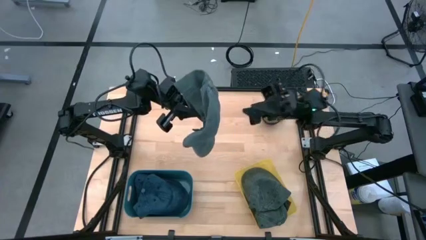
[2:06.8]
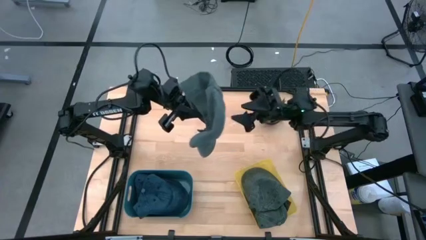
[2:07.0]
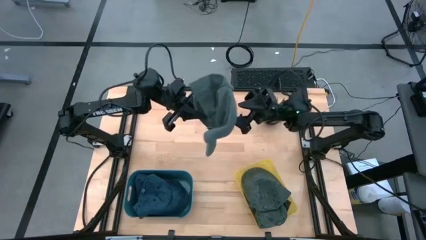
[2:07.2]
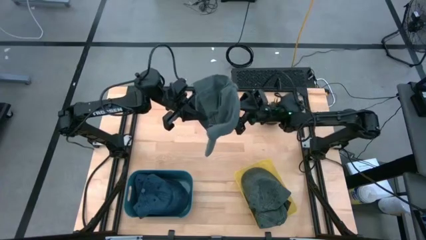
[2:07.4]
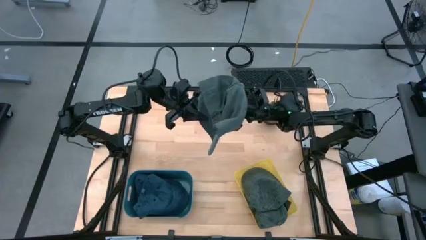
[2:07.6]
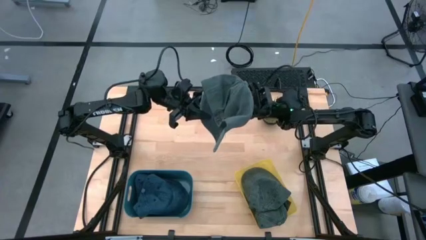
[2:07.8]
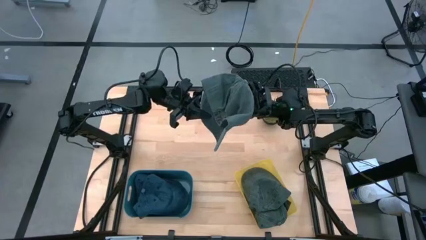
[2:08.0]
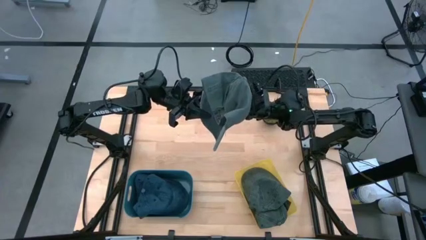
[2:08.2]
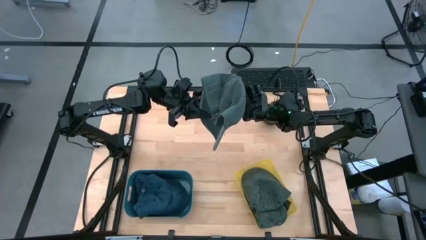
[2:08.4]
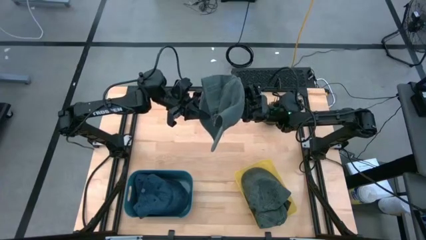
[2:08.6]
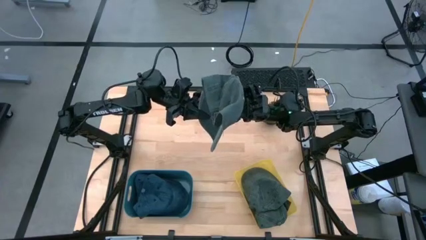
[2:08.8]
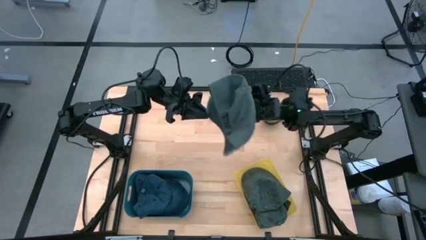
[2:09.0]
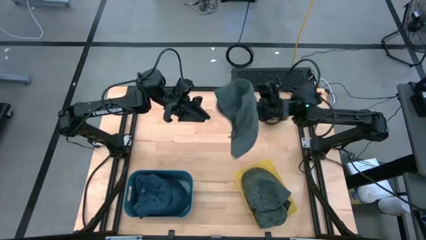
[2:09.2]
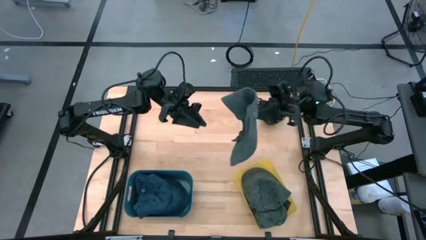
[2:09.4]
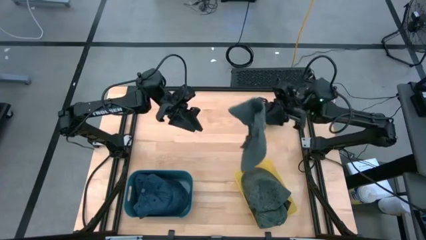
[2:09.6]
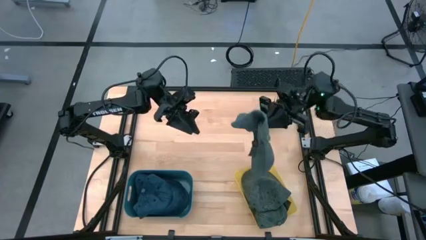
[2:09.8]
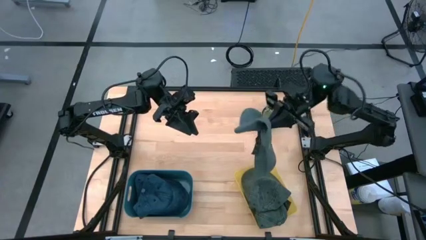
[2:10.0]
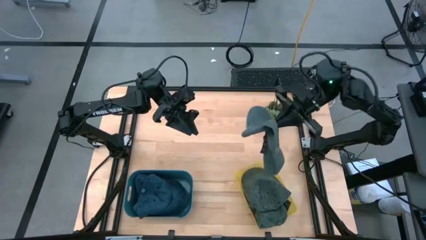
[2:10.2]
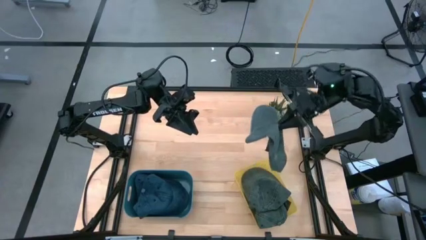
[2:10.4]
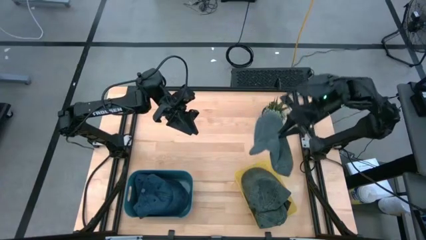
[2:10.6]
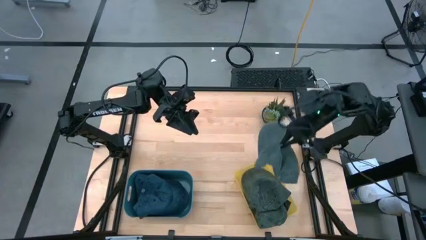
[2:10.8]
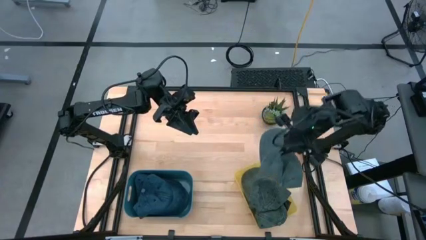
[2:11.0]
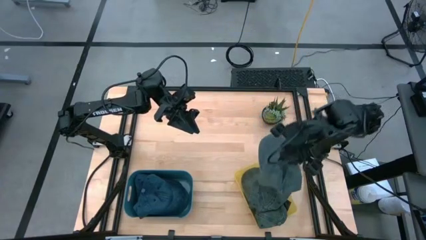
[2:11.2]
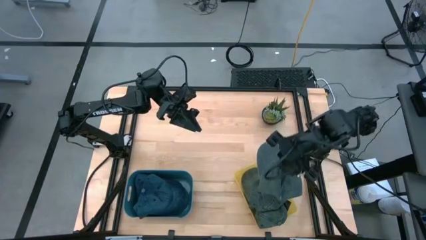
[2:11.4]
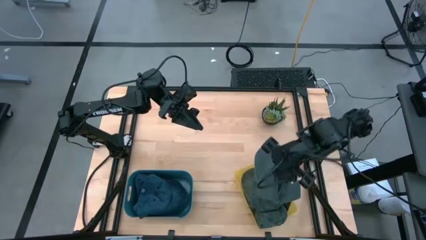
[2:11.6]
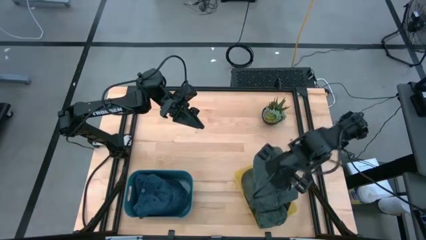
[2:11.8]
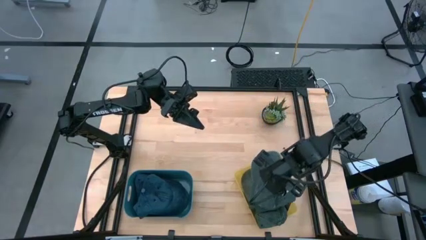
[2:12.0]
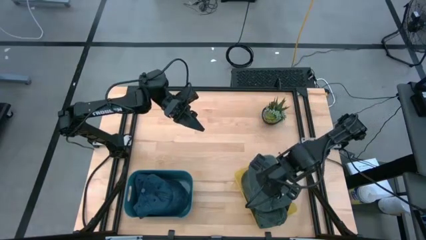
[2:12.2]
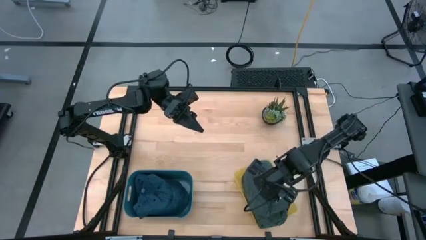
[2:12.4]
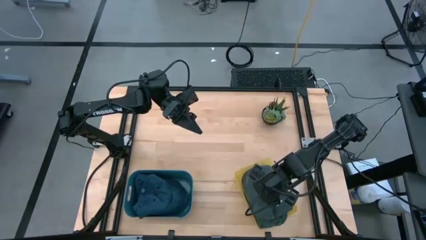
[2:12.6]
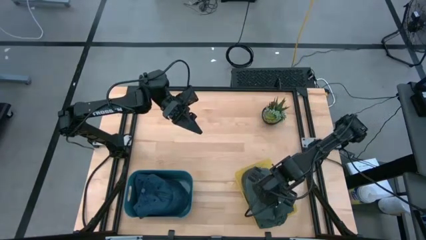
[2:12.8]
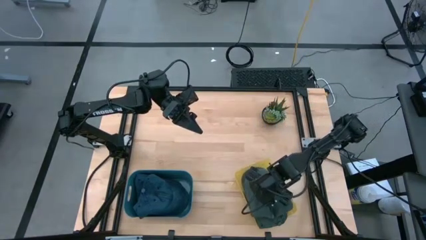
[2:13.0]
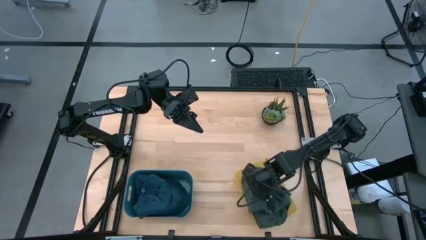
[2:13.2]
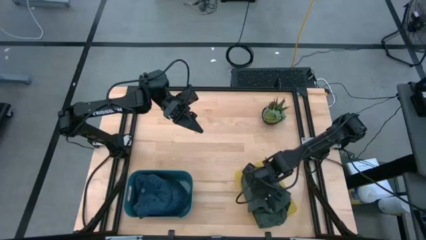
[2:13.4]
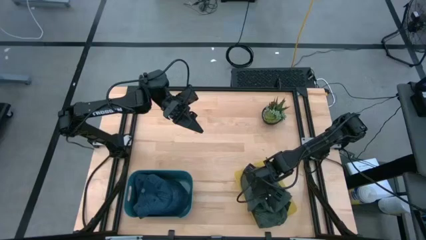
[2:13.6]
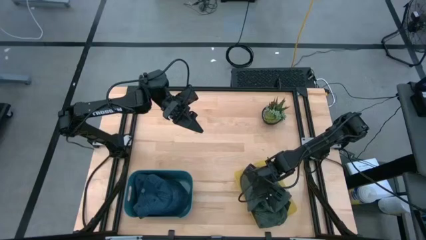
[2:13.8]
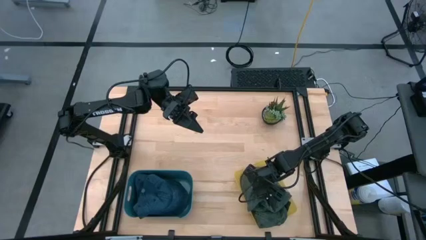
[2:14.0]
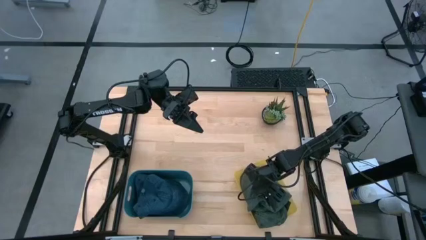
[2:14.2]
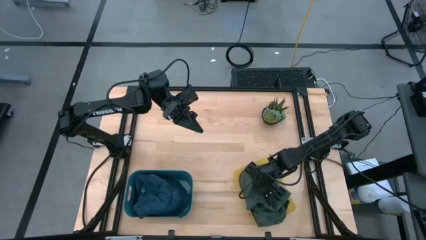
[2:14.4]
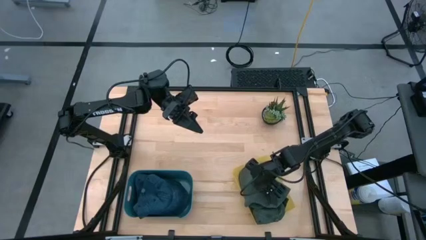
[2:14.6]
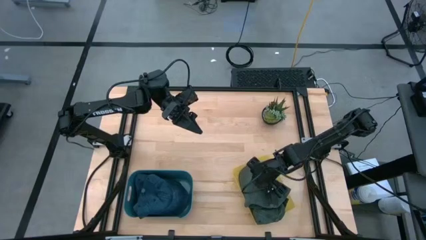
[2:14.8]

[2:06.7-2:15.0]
Task: Pick & Place hat
Put the gray cap into the yellow bin

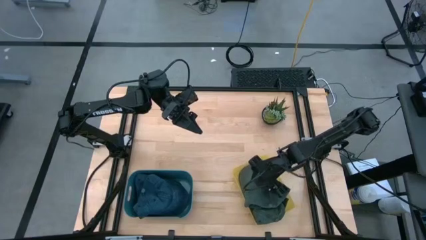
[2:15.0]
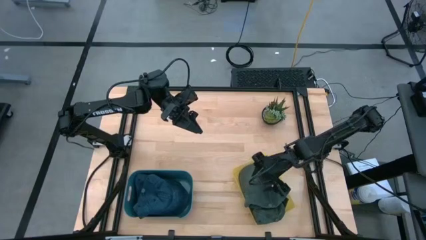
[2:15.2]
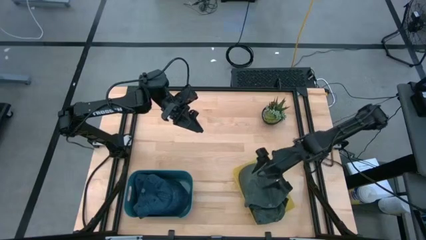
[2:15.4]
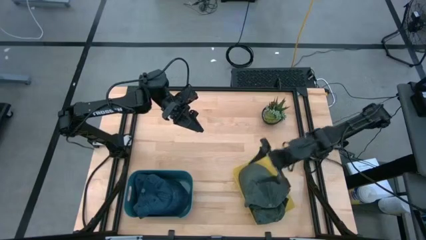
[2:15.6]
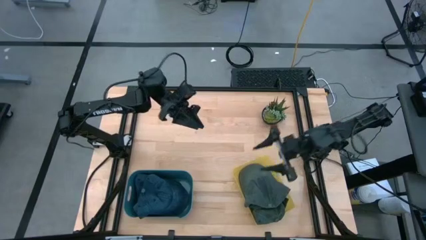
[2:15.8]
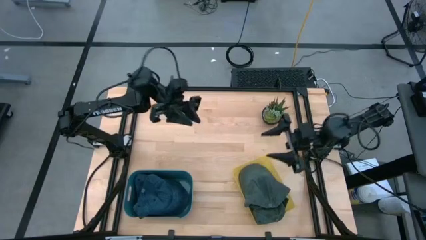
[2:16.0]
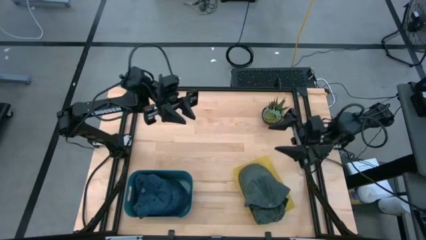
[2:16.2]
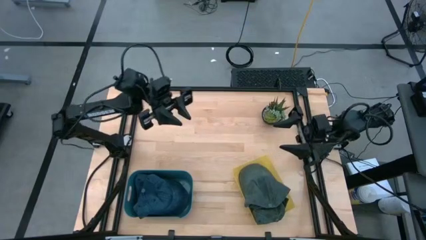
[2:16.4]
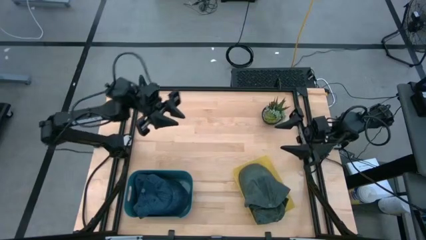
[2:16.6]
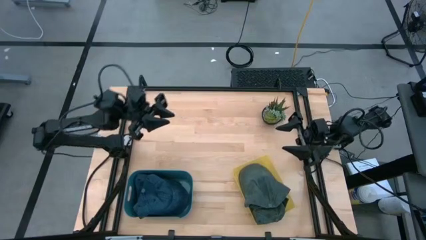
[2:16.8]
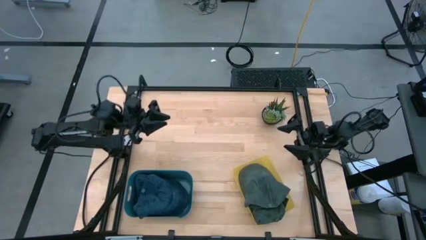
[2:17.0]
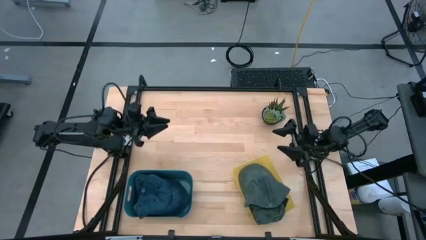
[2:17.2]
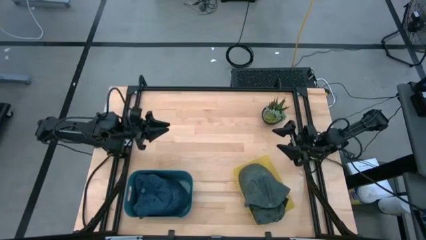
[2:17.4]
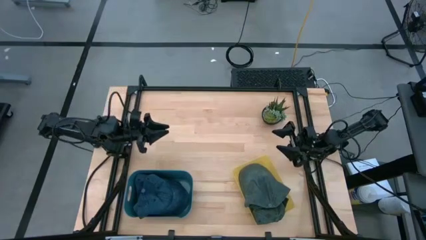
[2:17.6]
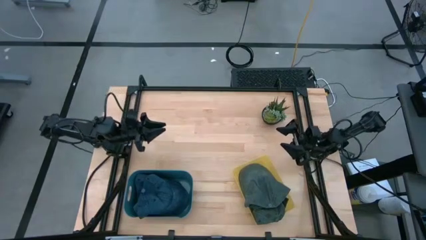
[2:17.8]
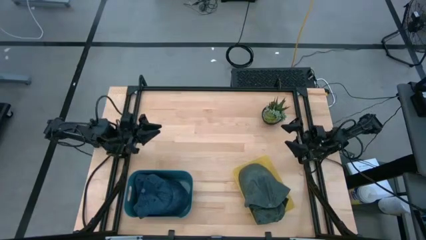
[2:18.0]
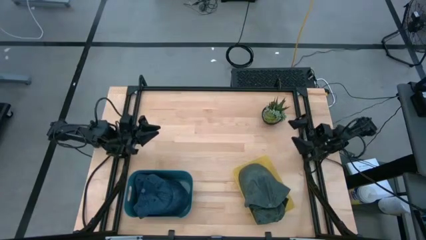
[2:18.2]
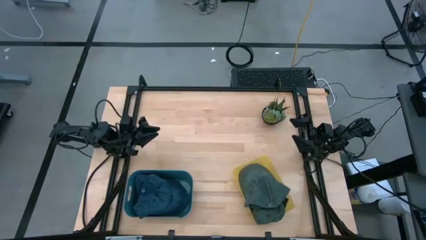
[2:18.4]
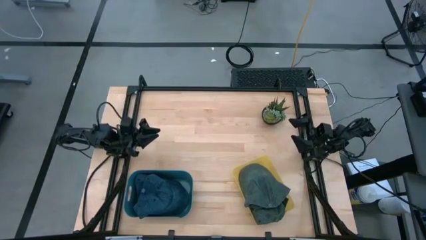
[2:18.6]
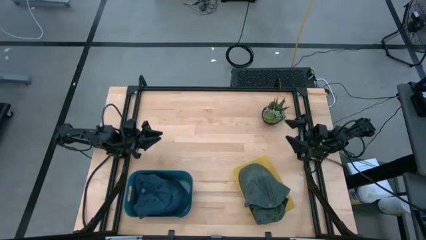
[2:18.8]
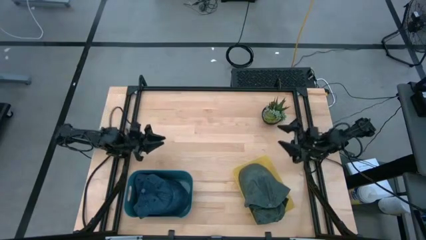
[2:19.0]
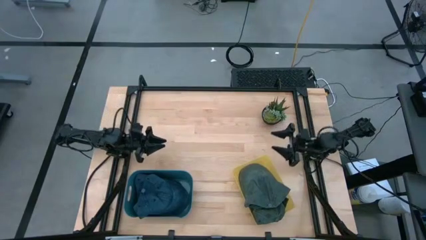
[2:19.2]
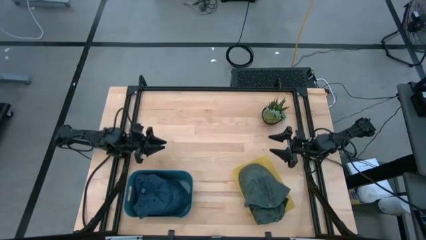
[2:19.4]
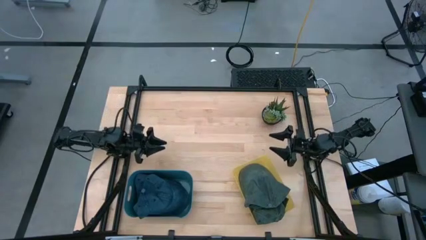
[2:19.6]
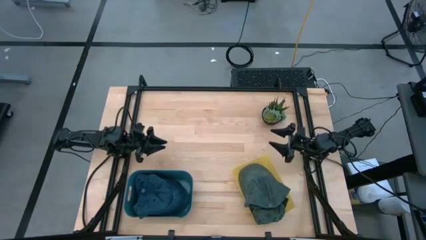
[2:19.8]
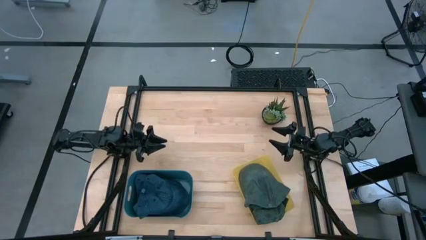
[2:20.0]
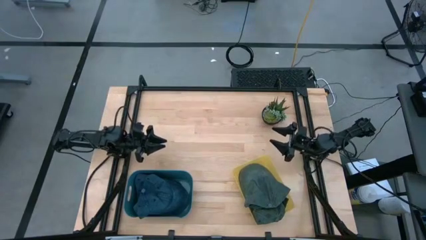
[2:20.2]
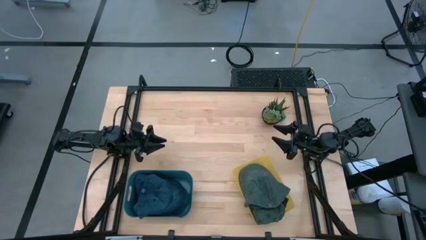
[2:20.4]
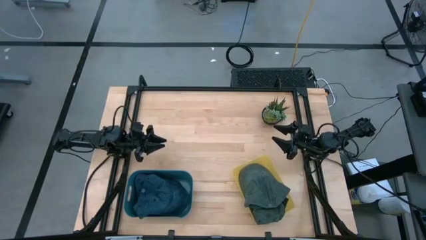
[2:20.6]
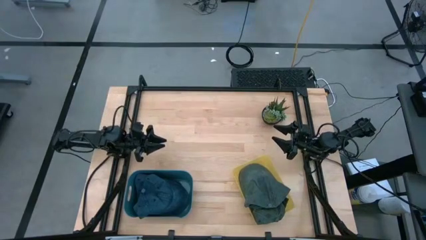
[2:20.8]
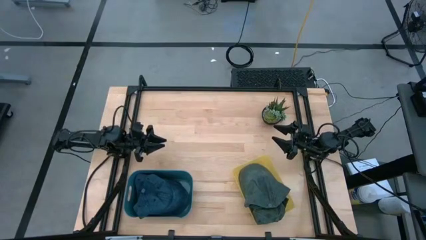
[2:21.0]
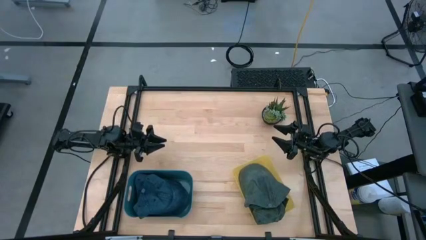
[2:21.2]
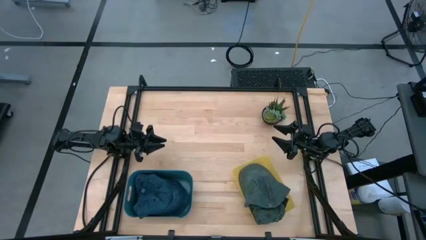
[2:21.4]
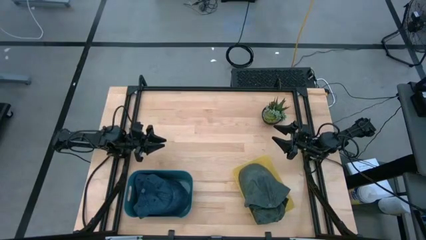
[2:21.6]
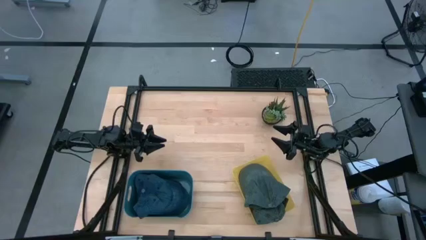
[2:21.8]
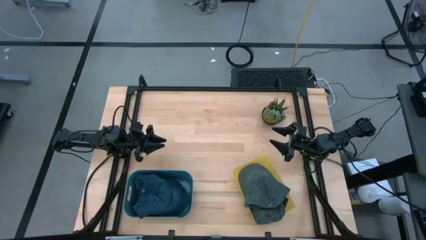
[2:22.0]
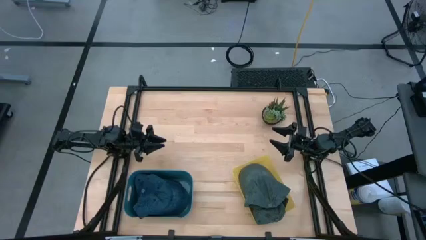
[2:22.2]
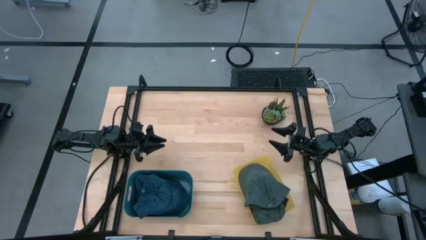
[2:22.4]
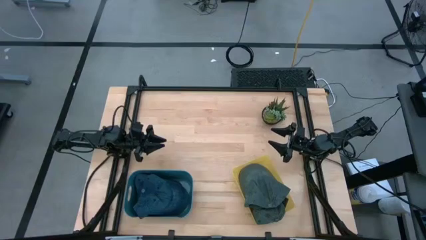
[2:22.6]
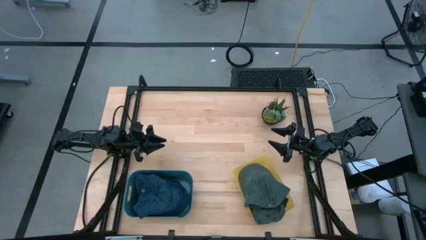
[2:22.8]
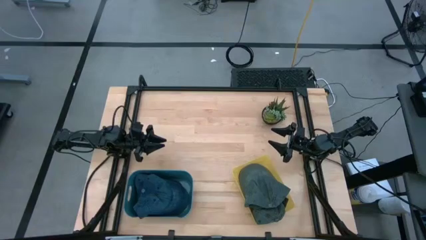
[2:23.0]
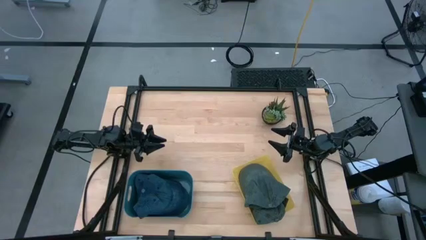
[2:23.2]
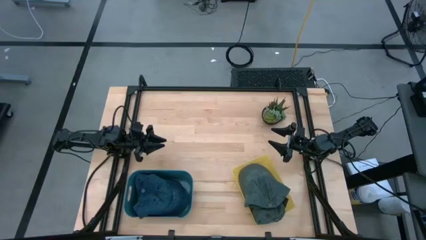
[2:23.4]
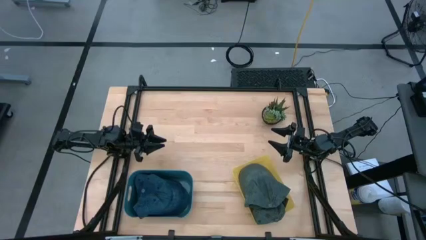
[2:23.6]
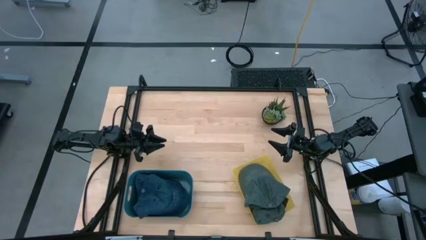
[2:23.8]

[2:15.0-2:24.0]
Return to Home Position

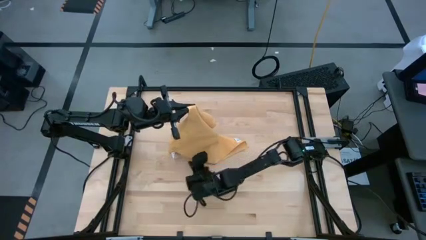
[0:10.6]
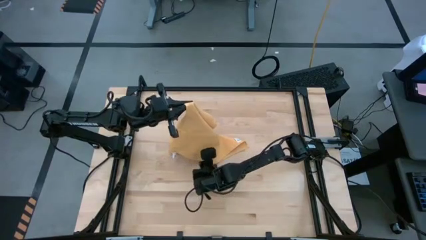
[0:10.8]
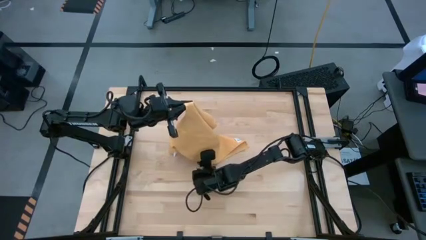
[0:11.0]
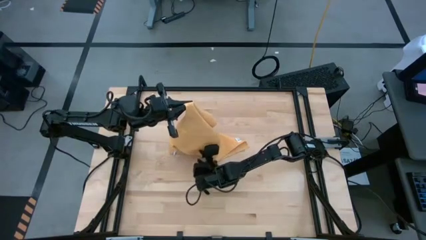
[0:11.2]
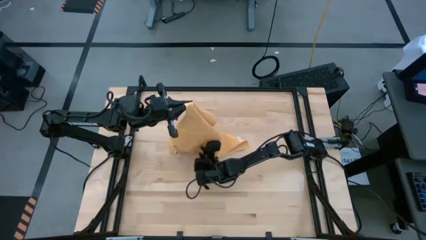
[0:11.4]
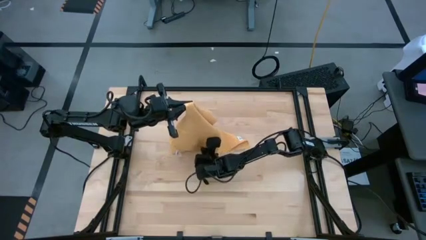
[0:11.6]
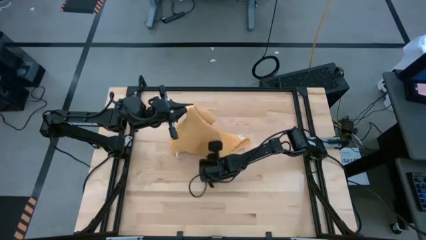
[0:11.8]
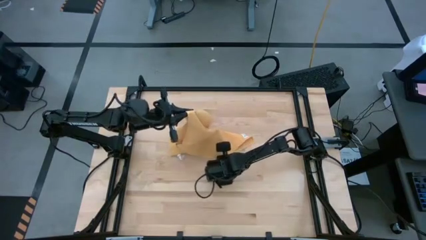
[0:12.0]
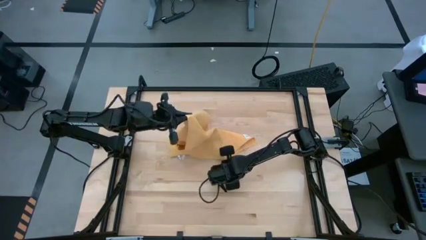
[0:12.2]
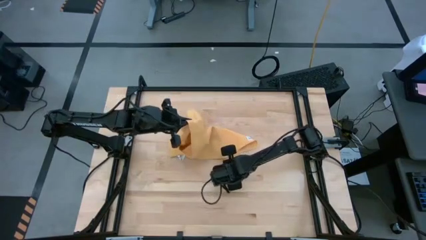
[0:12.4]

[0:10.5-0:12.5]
Task: Roll towel
Fold the yellow towel
